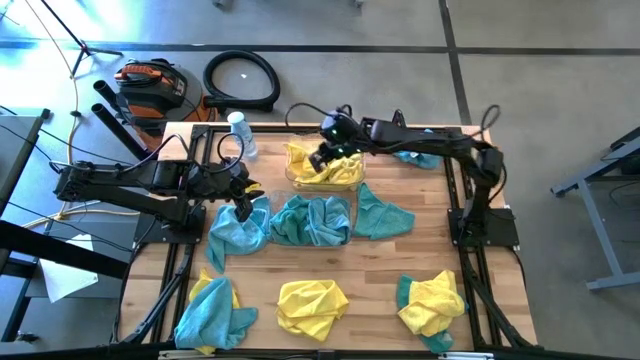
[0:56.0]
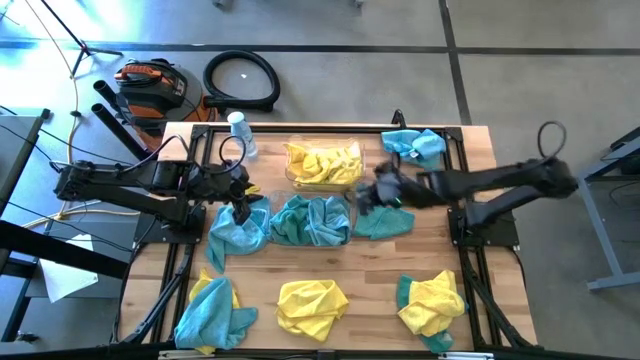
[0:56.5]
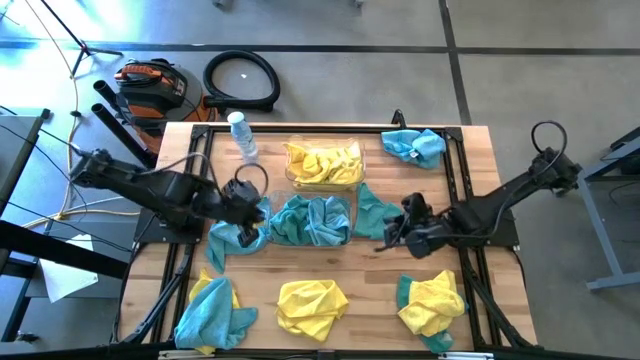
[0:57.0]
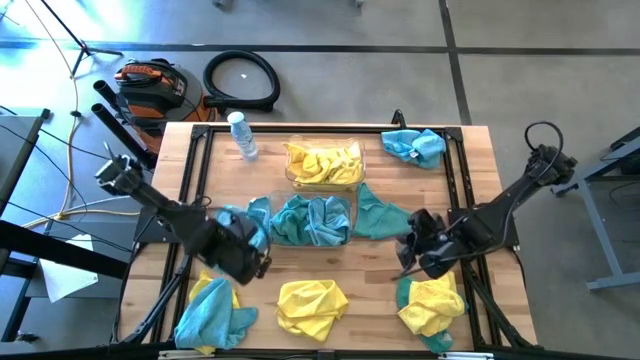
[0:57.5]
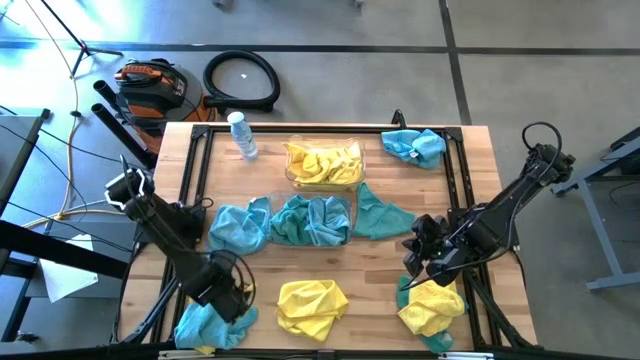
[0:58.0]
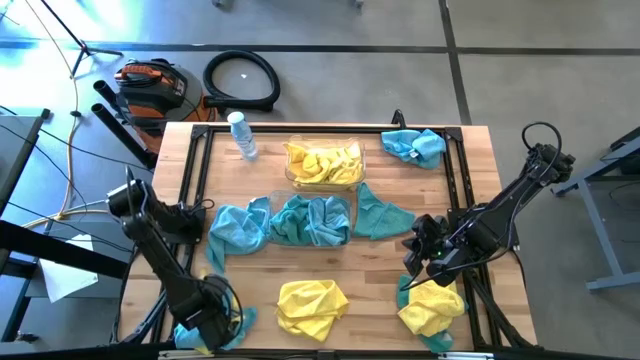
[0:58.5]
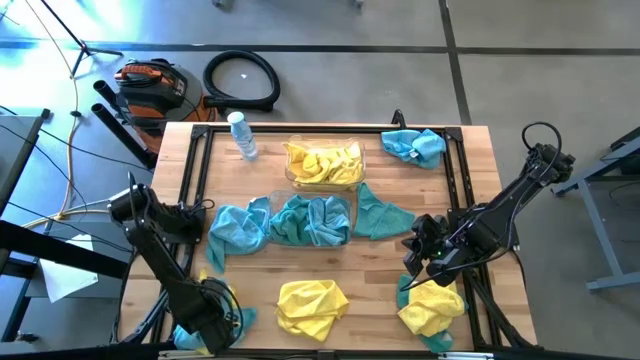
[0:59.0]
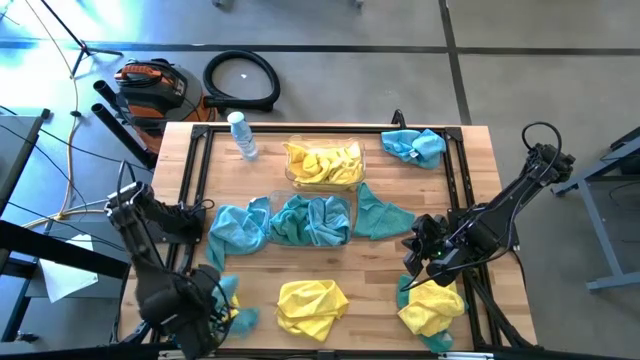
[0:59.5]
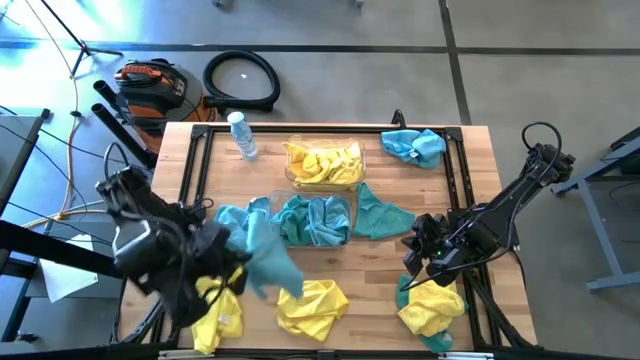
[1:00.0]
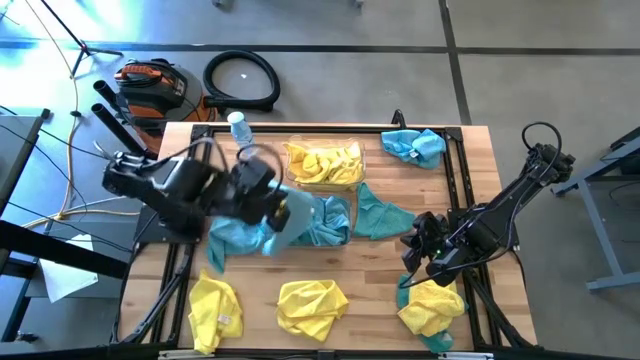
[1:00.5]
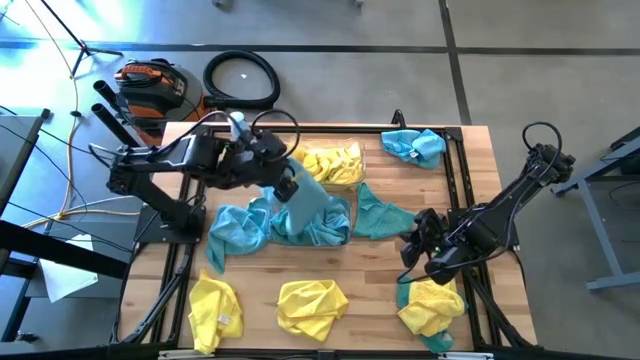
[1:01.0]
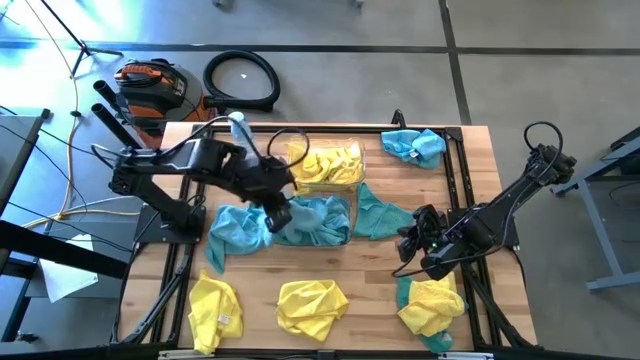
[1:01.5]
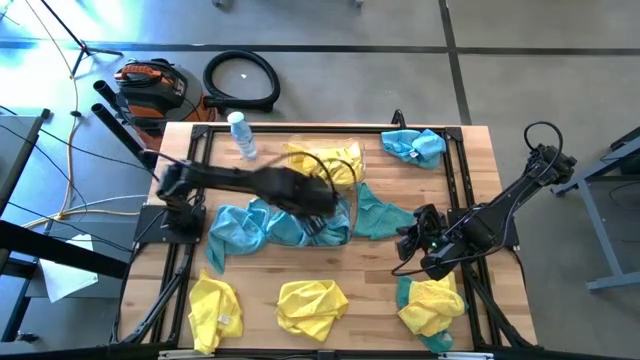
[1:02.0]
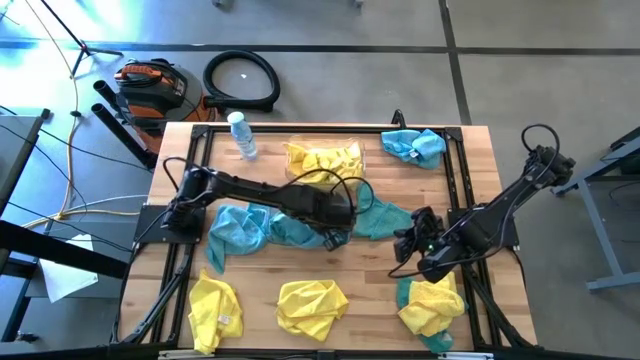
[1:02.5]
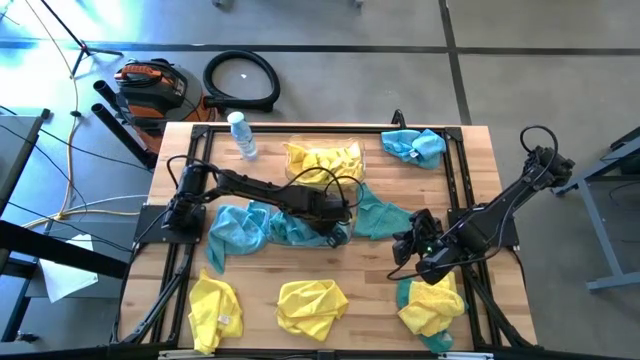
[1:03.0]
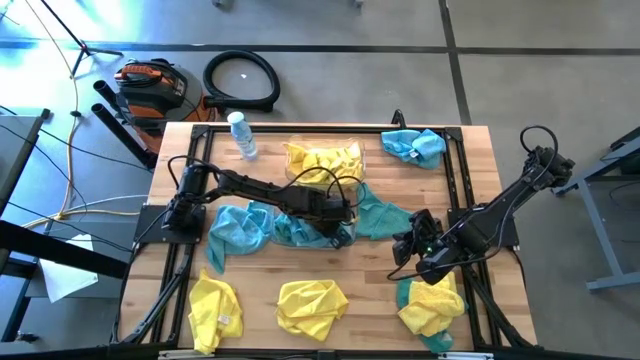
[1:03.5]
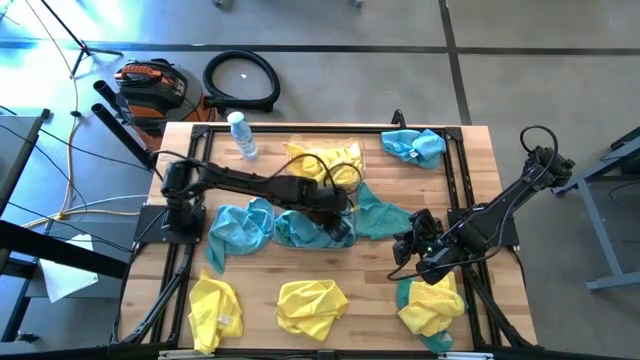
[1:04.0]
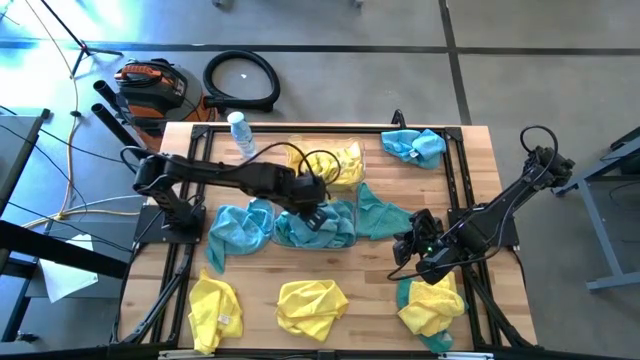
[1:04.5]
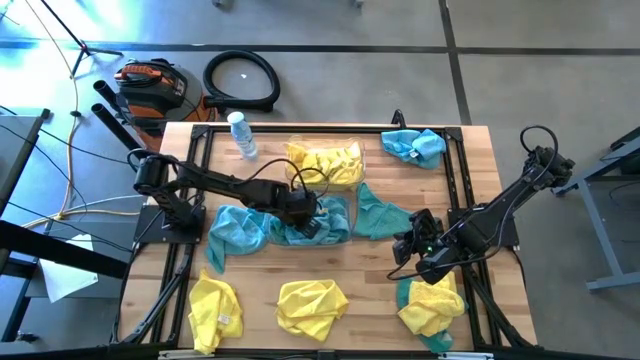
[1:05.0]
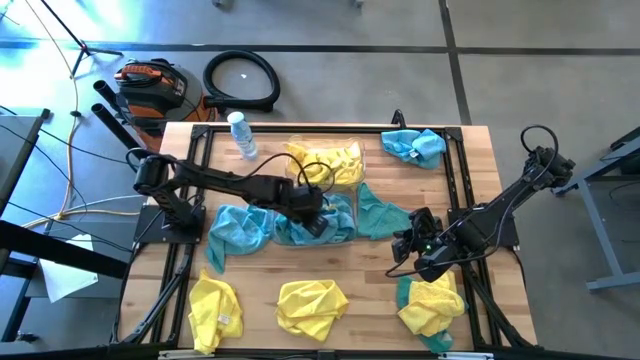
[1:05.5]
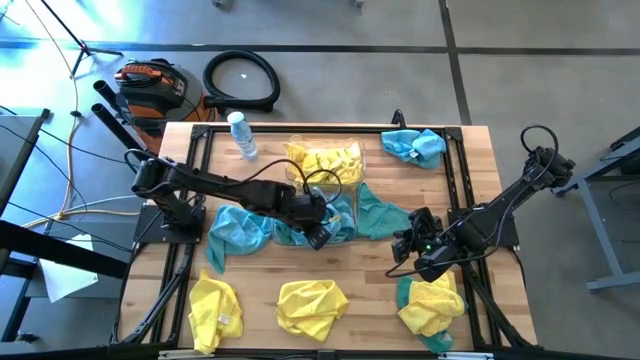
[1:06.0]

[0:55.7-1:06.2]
Task: Sort microfiber towel by color & place in baskets
Put the blue microfiber cloth into the bottom transparent bin

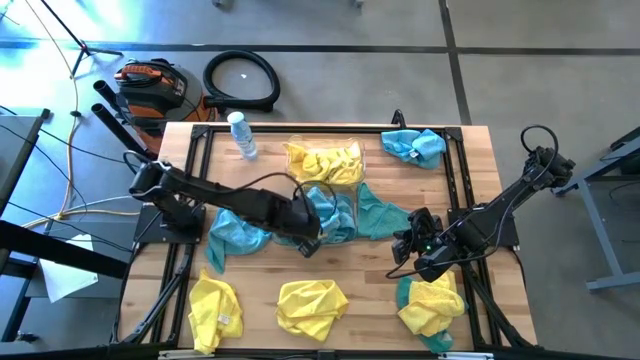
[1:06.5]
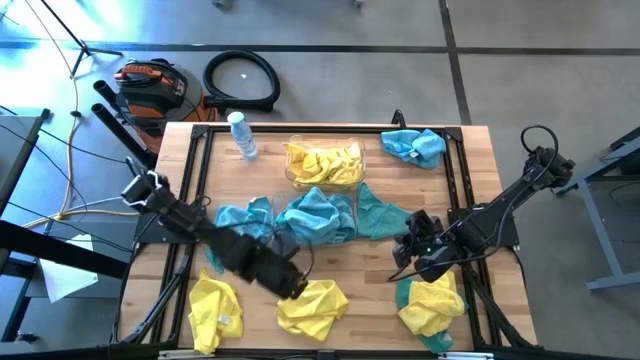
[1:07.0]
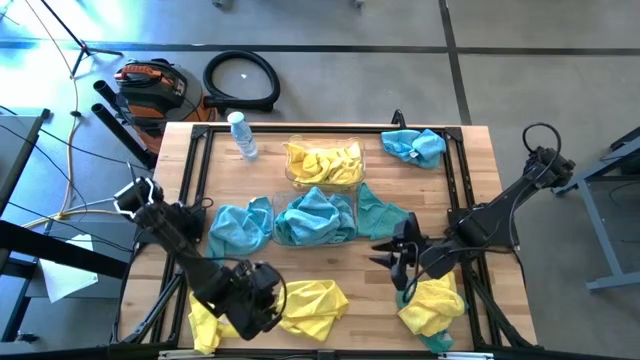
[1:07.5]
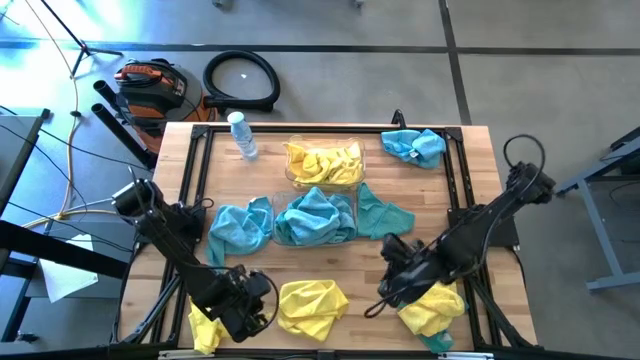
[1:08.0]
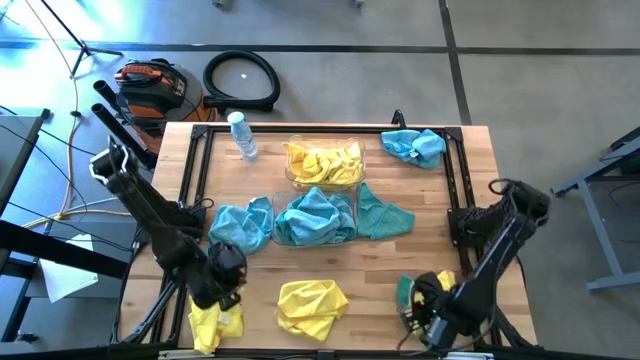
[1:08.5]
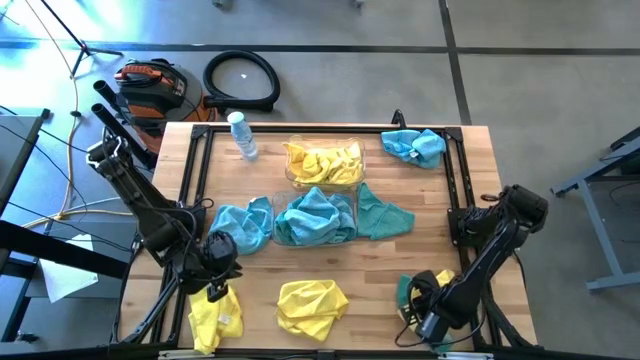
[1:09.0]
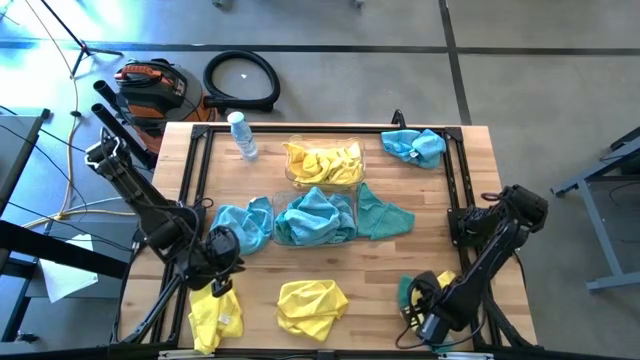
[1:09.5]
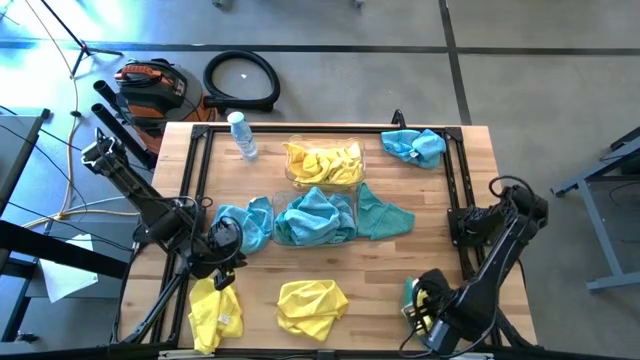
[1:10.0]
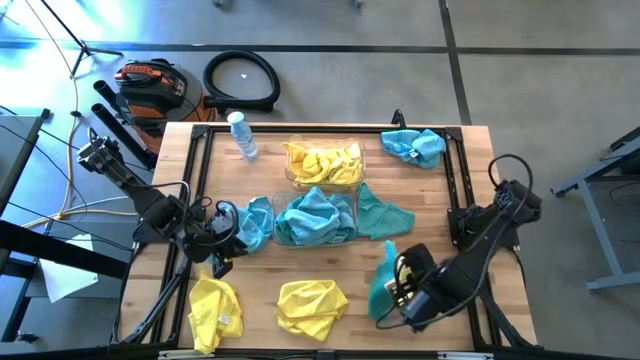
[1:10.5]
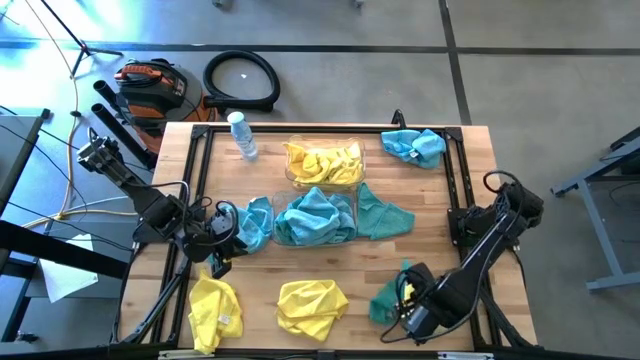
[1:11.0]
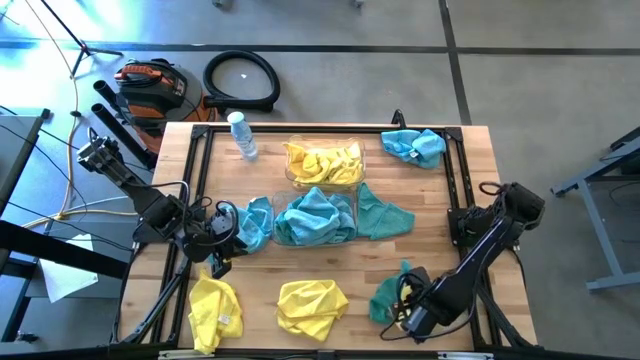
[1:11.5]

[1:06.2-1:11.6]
Put the yellow microfiber cloth into the top transparent bin

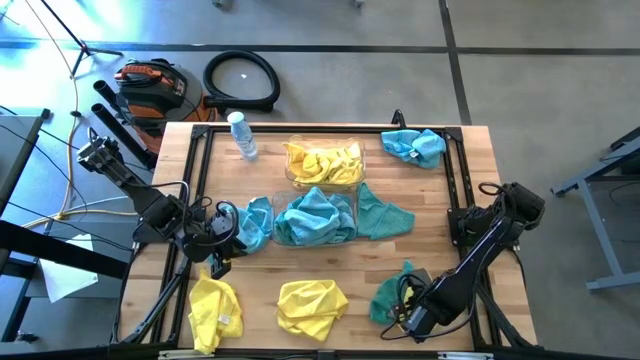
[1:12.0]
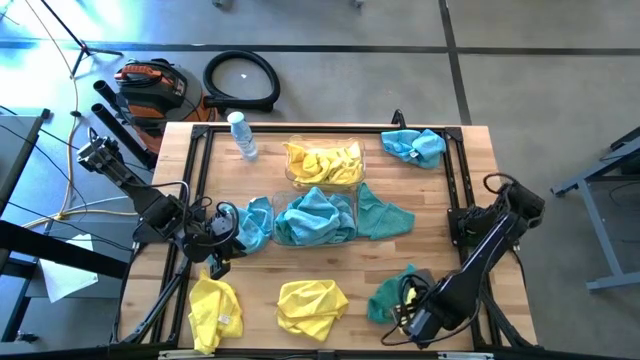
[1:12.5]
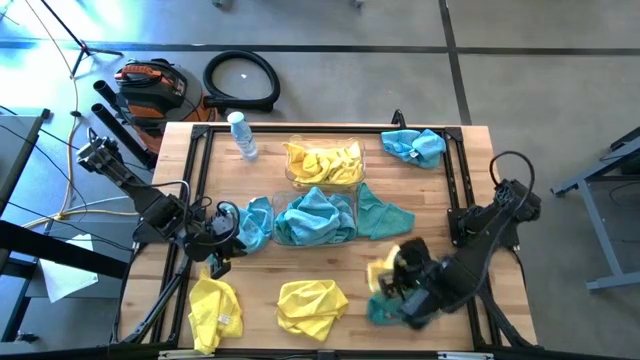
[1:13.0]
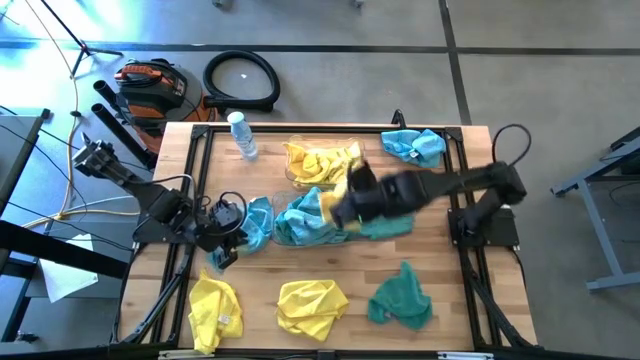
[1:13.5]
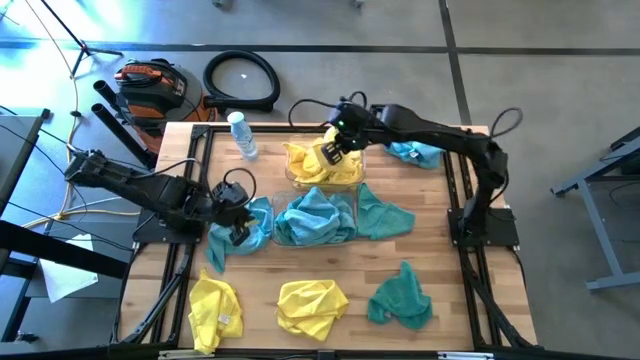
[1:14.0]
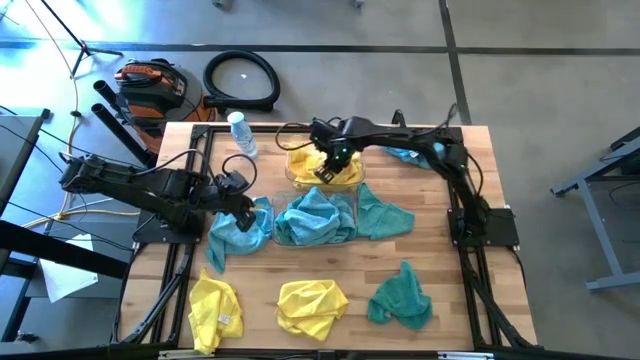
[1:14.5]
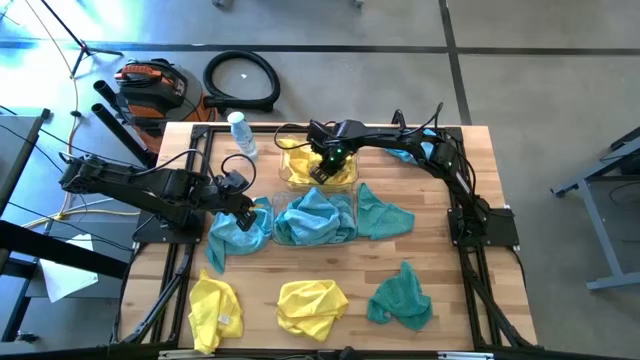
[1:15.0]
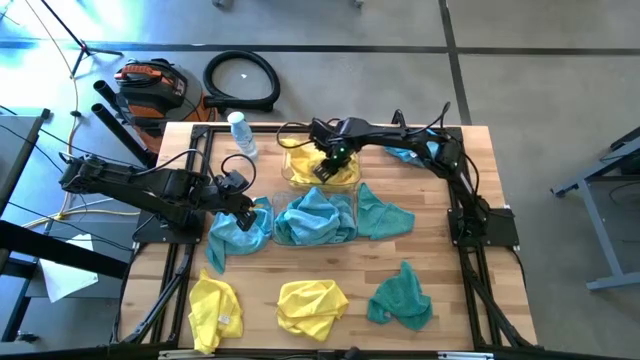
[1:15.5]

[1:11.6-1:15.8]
Put the yellow microfiber cloth into the top transparent bin
